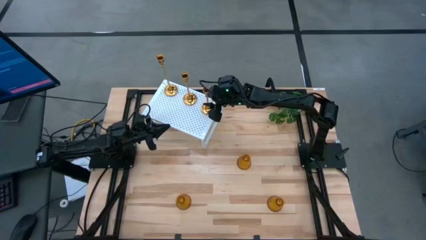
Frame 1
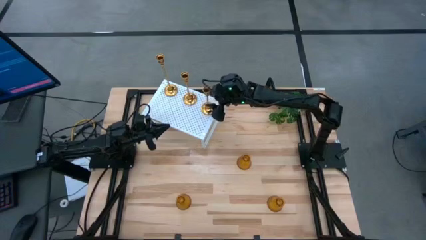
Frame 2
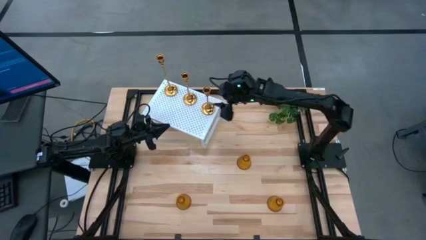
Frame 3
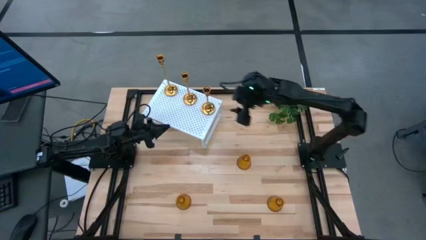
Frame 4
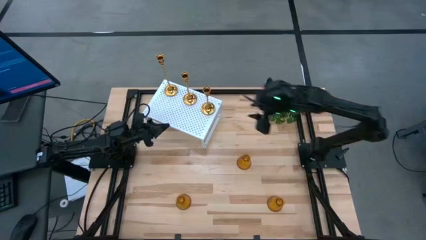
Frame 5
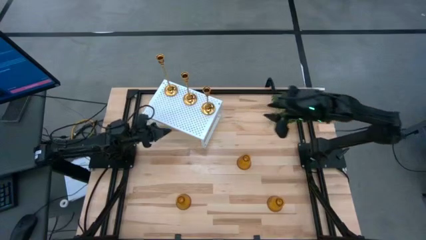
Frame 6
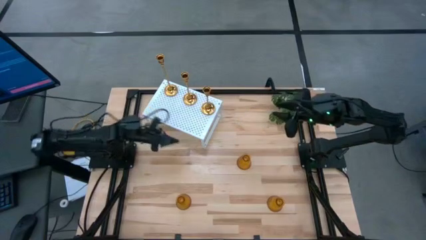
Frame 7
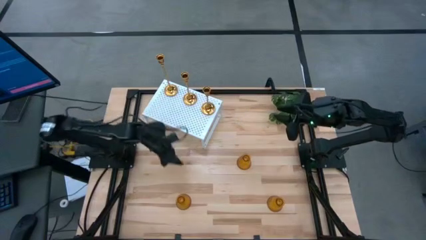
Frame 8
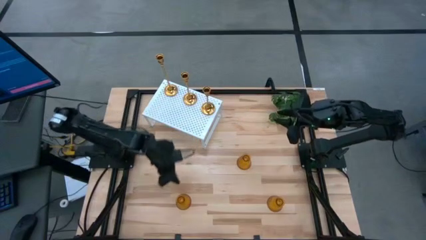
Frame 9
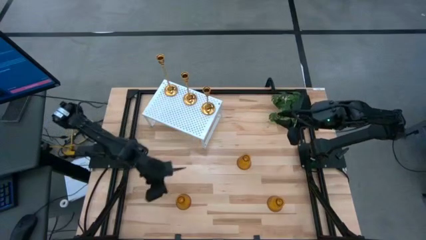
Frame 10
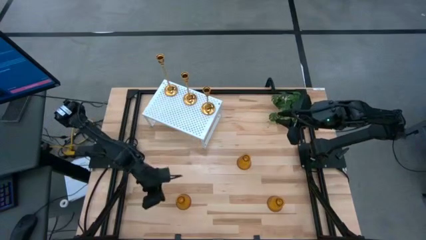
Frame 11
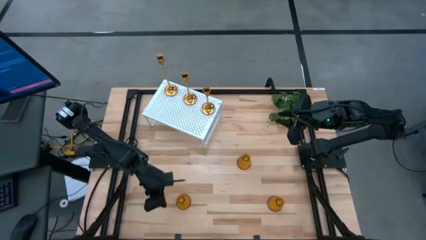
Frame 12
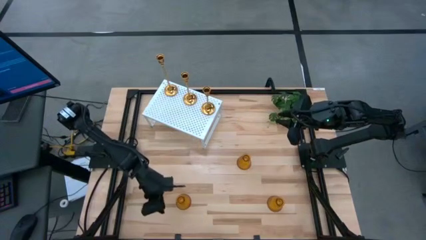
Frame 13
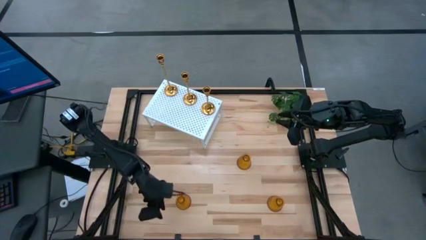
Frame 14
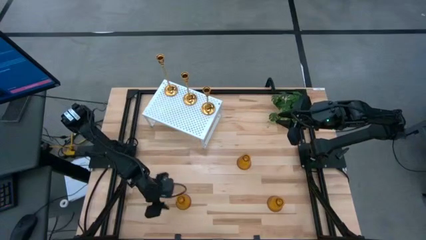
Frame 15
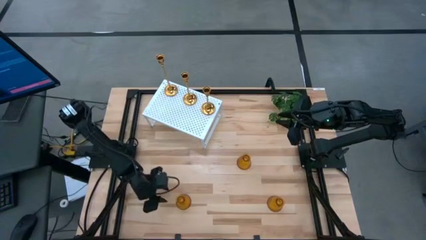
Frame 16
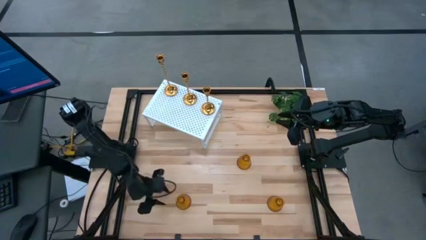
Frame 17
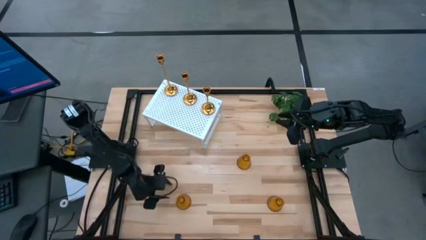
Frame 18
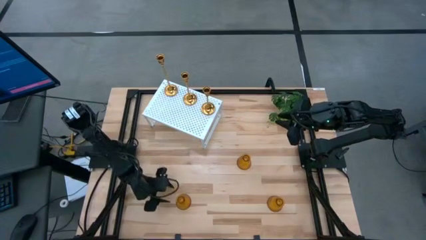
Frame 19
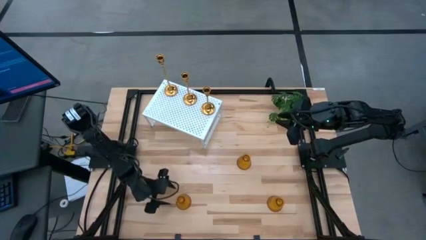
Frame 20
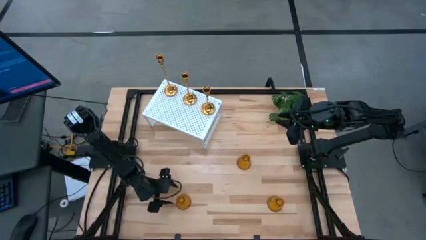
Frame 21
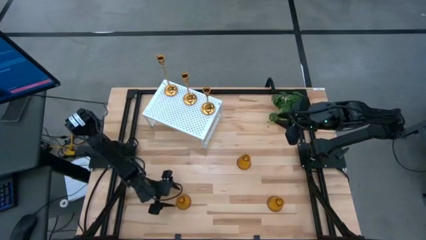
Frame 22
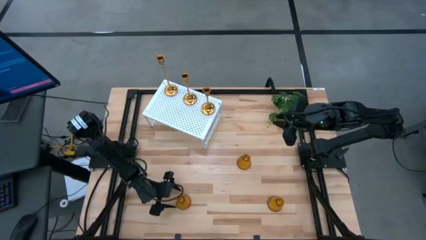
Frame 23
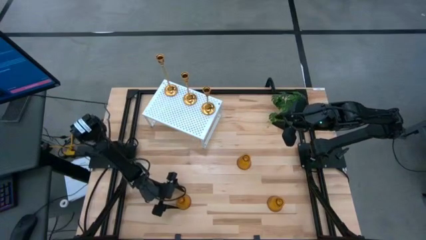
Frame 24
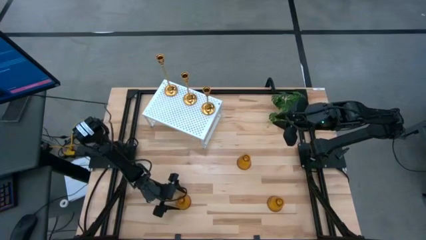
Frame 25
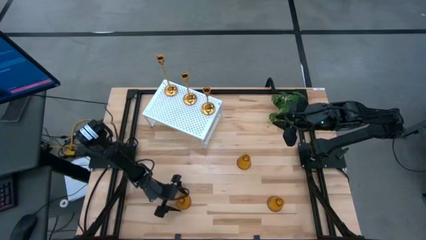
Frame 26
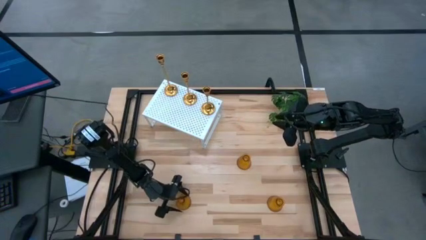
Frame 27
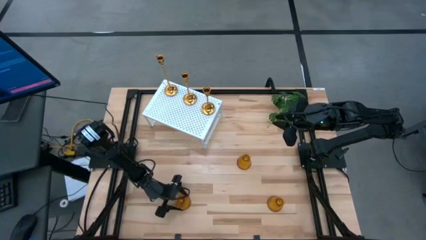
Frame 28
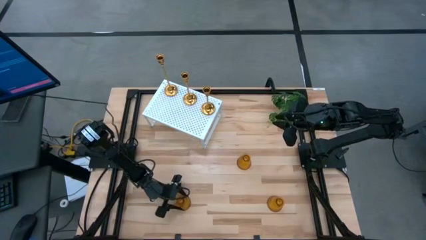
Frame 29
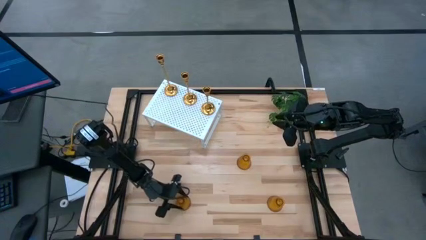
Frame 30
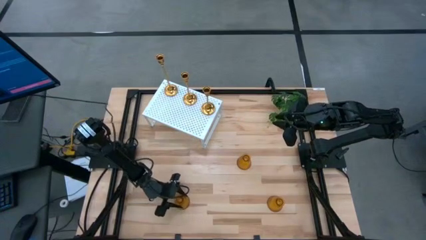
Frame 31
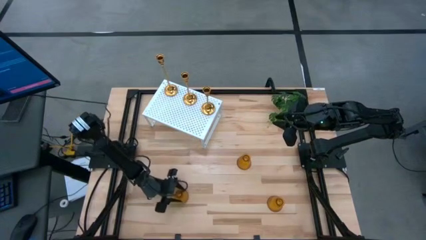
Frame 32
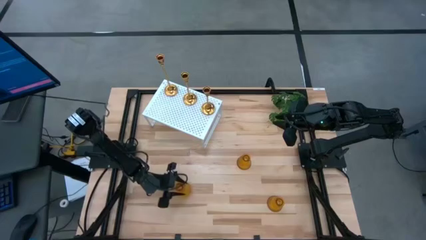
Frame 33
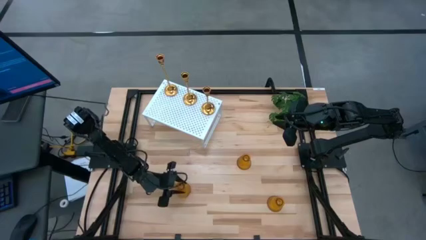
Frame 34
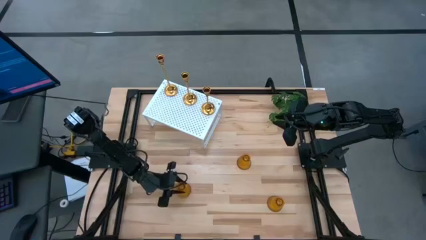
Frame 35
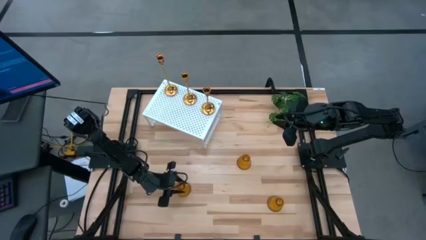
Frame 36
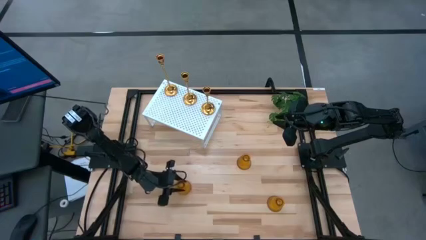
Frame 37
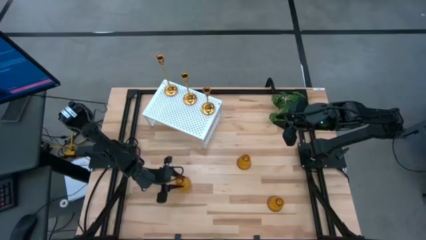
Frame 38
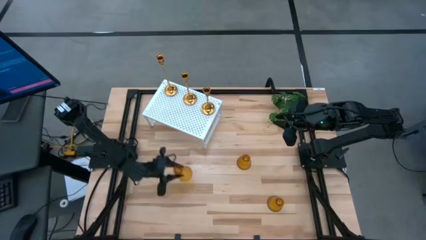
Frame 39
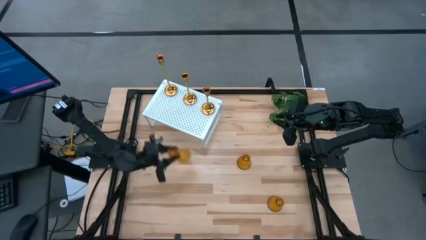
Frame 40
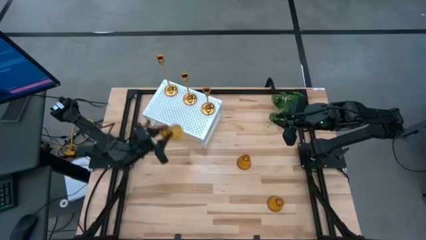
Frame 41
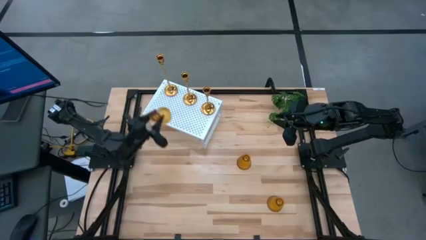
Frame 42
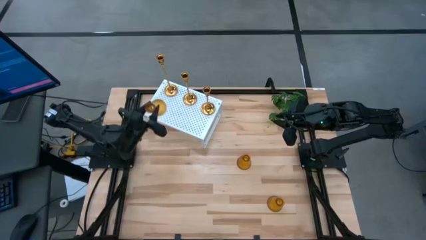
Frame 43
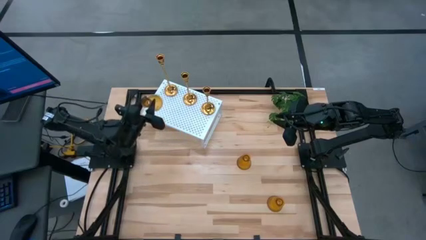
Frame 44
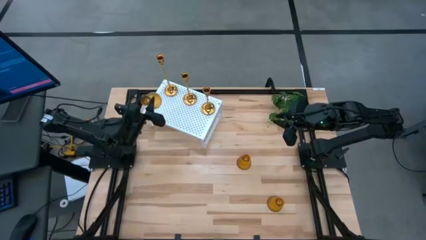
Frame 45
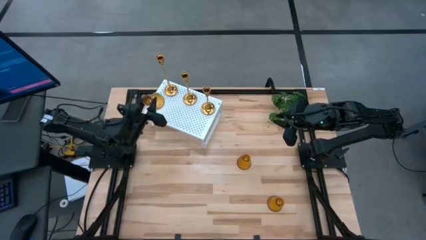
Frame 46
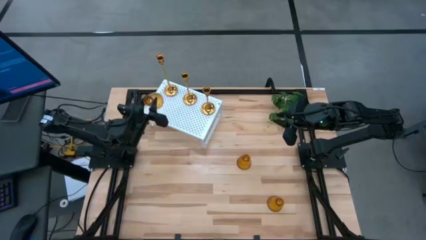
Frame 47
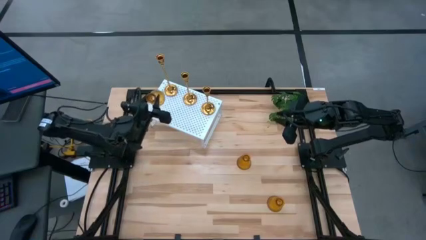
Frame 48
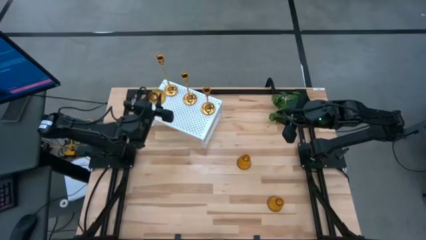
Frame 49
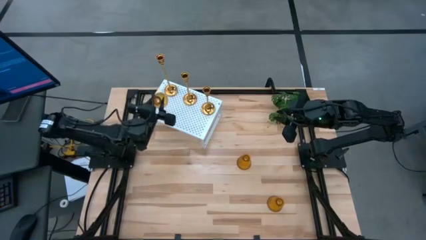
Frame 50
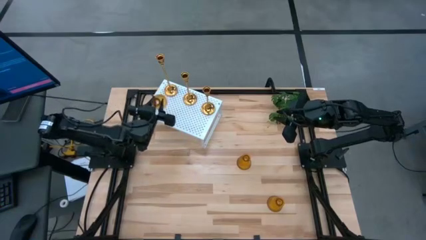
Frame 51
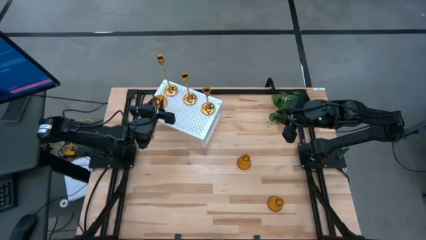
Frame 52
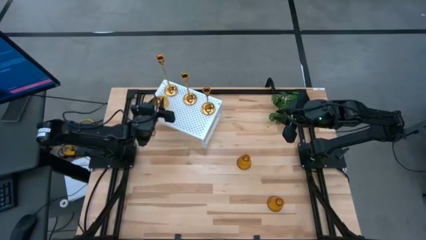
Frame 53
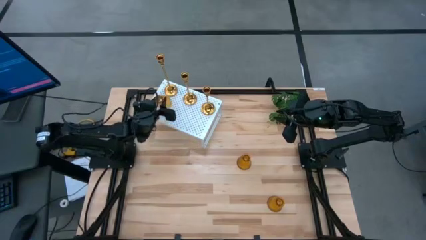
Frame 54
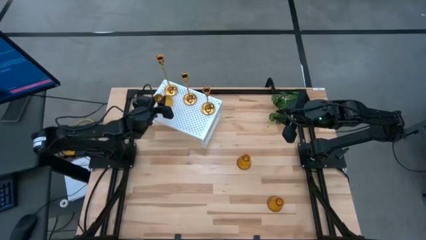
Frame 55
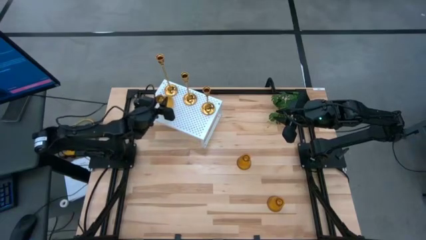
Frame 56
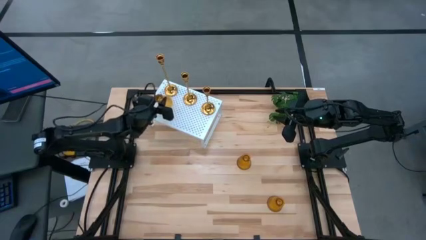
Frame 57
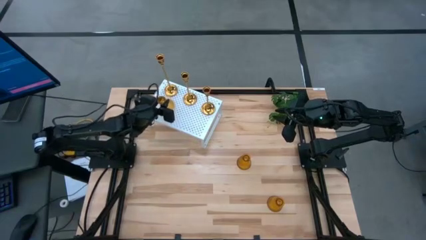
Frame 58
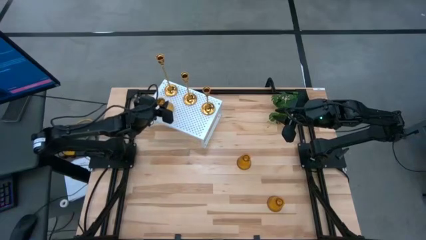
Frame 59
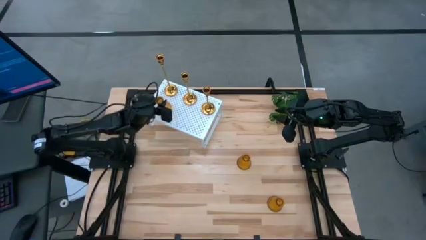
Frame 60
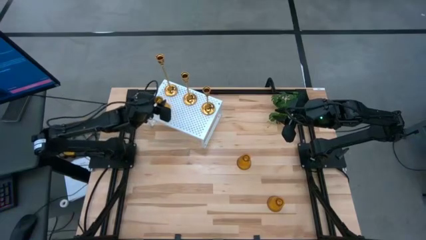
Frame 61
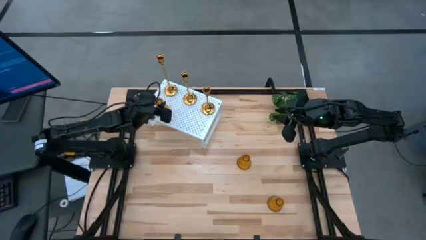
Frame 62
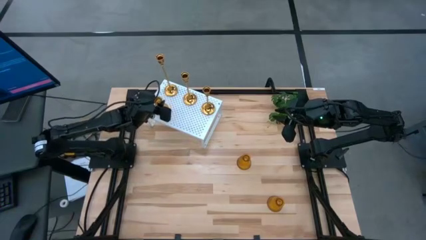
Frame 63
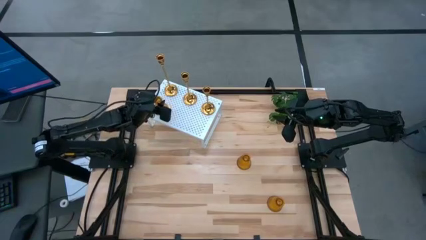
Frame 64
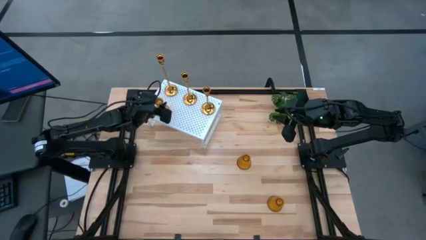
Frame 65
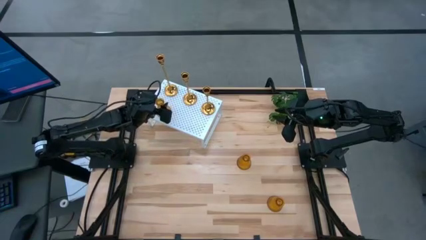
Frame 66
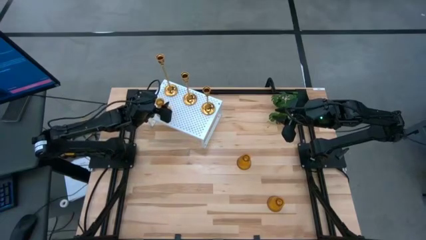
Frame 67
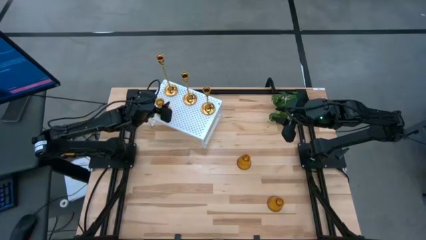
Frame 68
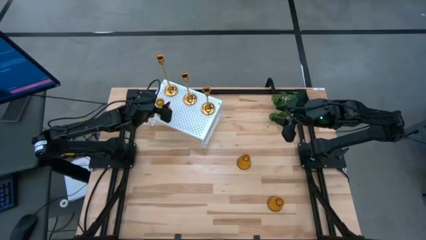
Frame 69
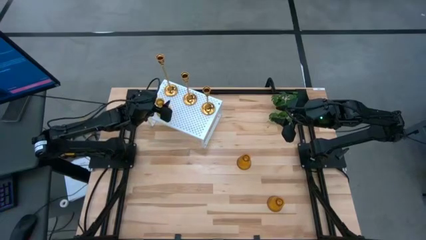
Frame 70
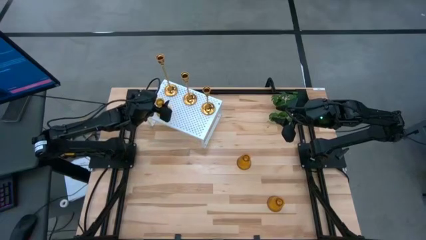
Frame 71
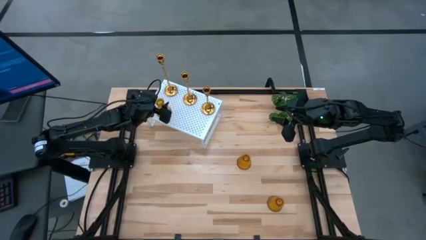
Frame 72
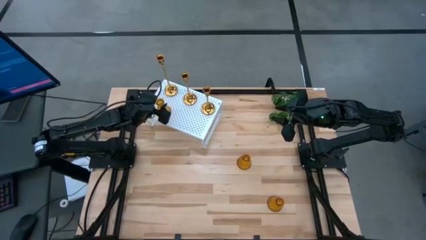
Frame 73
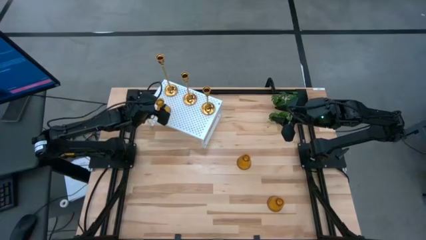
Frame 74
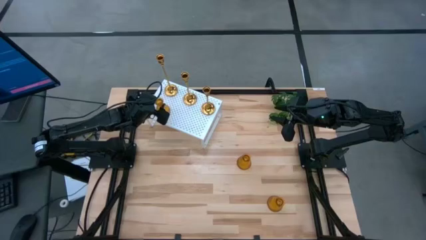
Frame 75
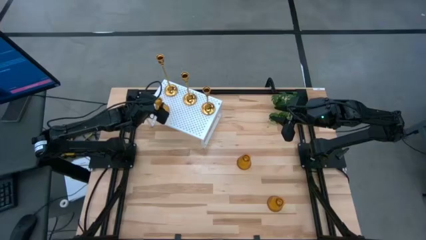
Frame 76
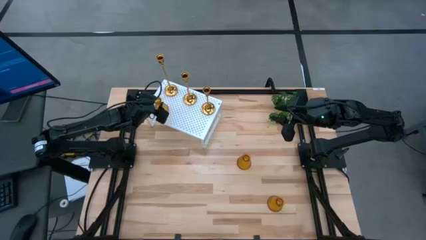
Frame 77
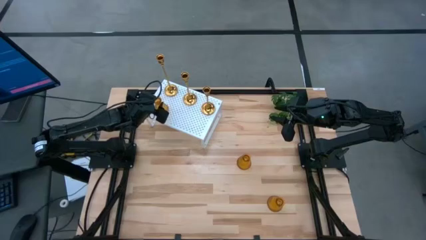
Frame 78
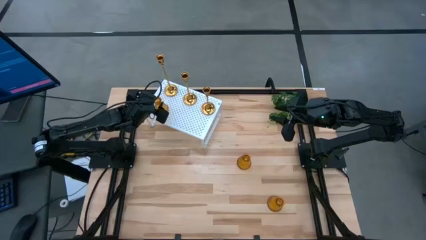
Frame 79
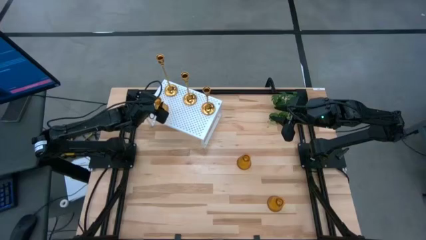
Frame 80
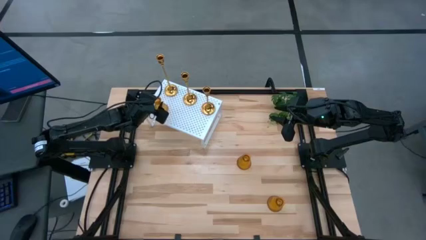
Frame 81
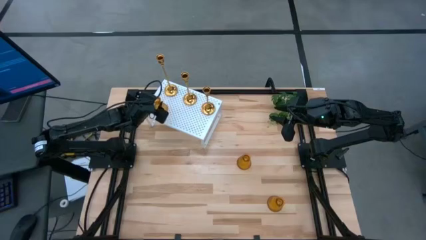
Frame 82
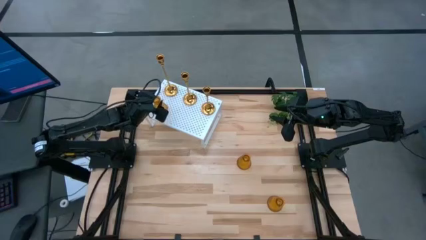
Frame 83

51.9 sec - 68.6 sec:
Task: Pick & Place candle stick holders
Put the bottom left brown glass candle holder on the shelf
